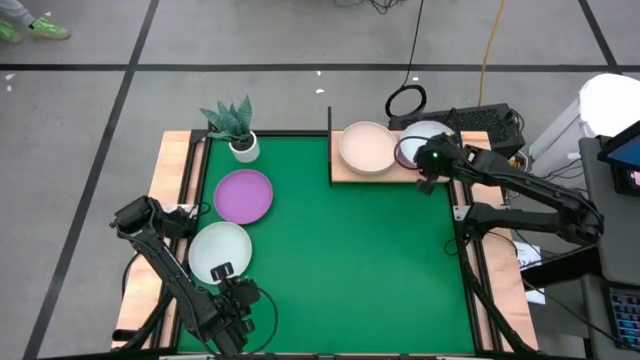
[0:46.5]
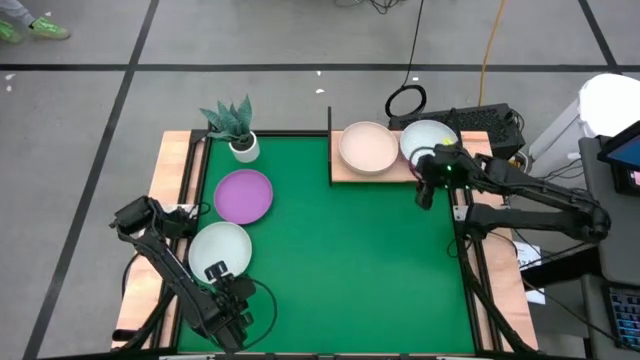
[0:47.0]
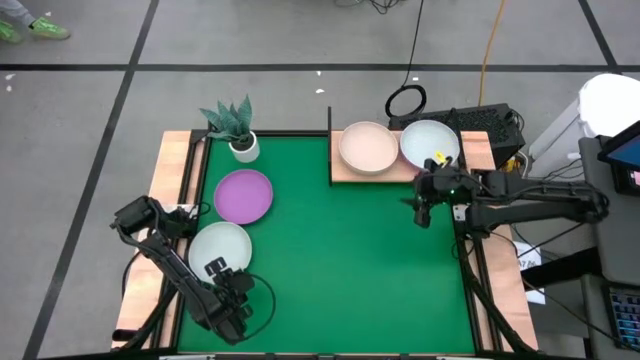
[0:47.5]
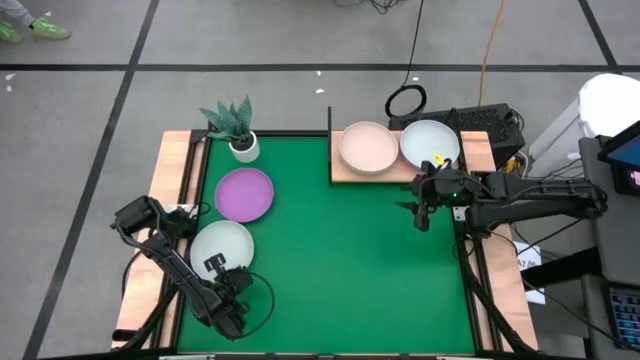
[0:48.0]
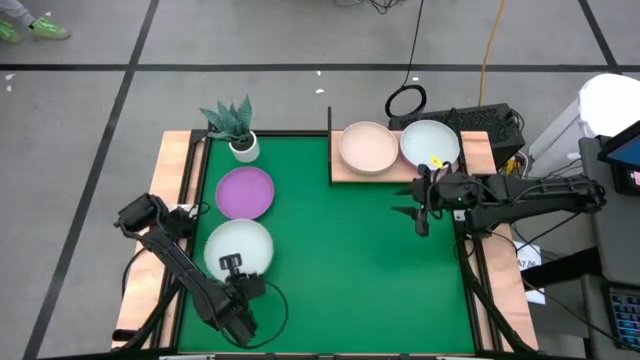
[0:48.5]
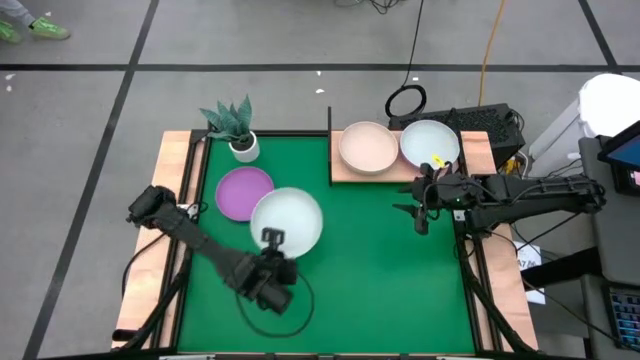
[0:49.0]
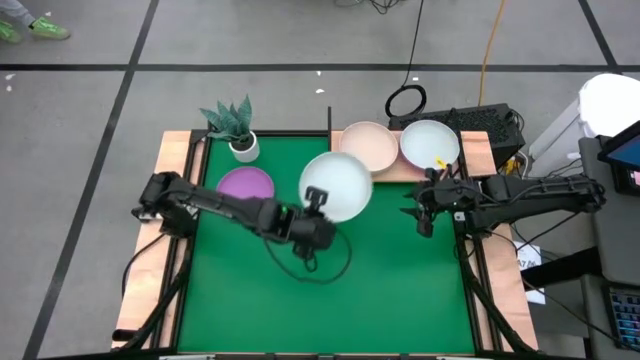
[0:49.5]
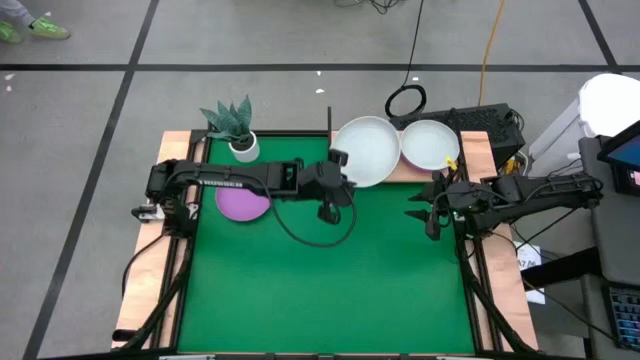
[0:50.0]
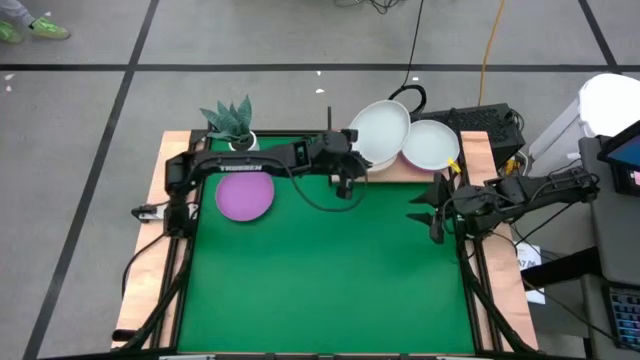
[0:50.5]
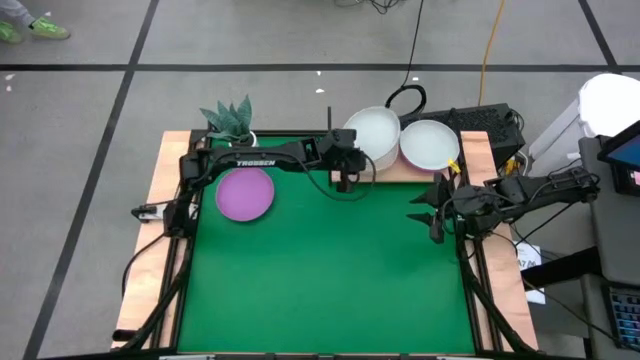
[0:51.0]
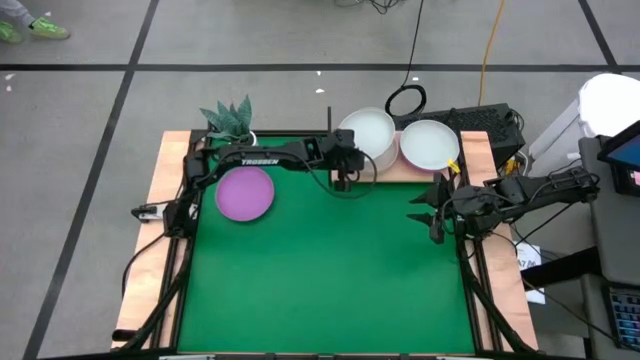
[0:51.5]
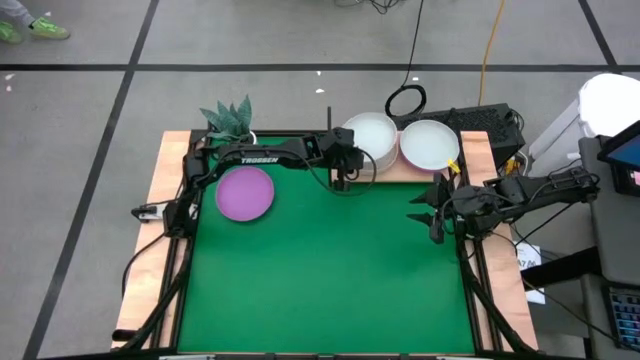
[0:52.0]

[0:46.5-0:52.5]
Task: Place and stack plates onto a shelf
Stack the light blue plate on the light orange plate on the shelf

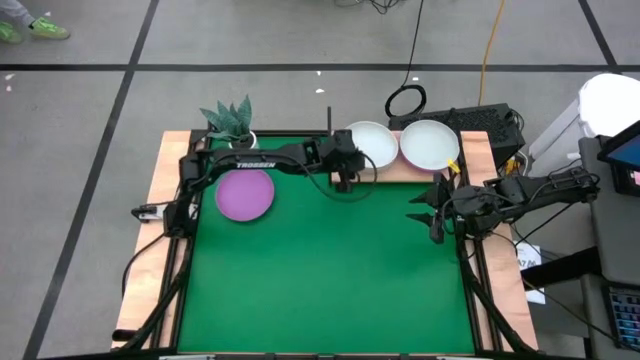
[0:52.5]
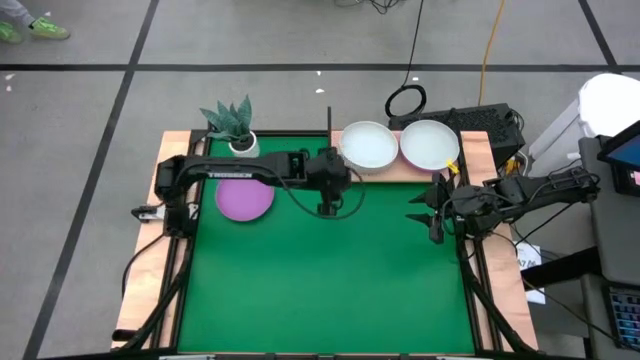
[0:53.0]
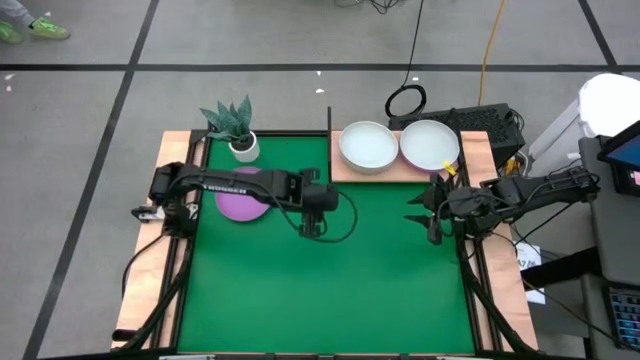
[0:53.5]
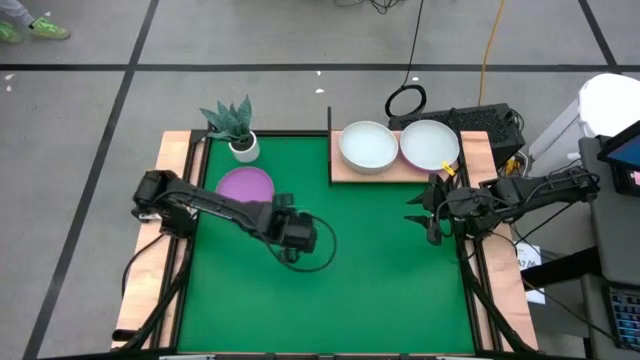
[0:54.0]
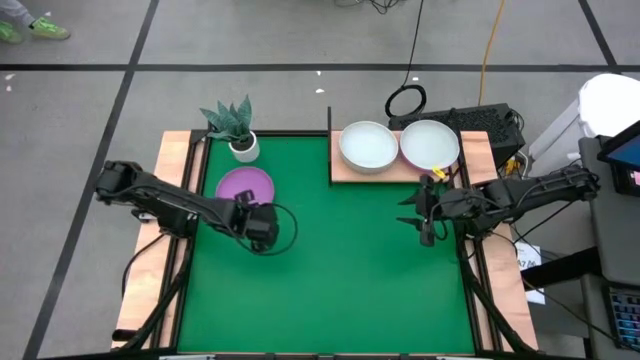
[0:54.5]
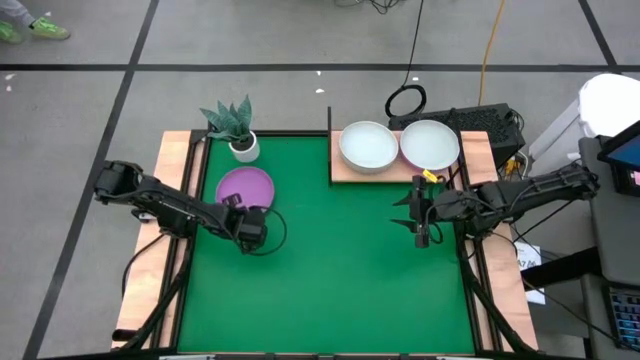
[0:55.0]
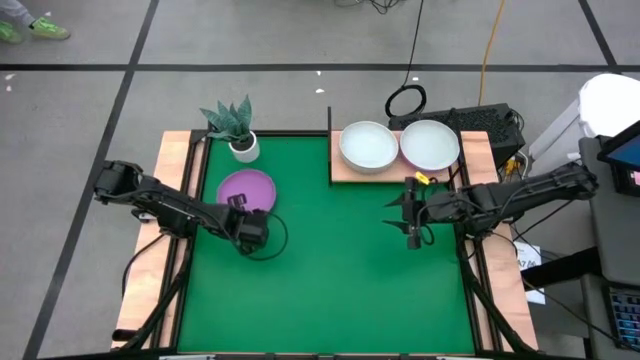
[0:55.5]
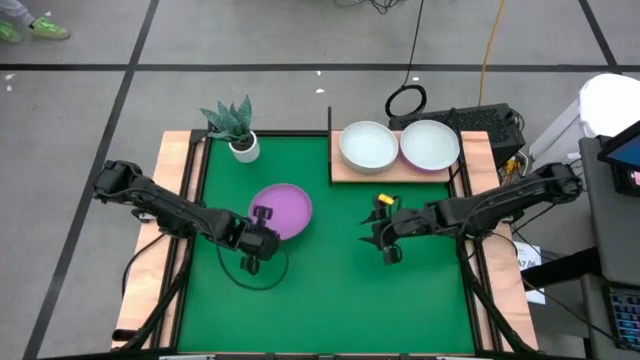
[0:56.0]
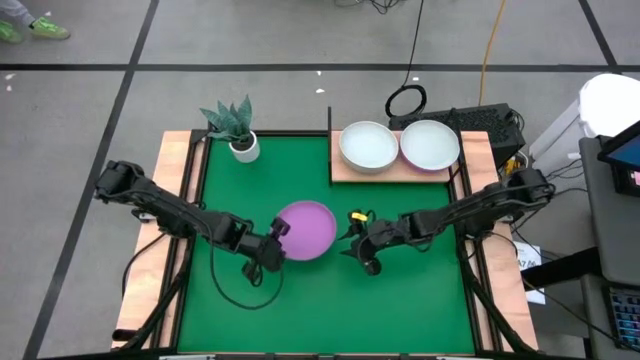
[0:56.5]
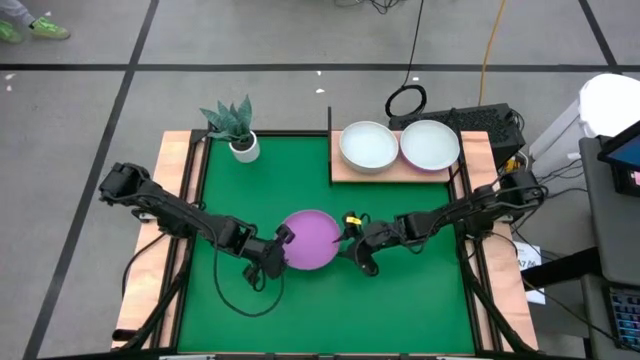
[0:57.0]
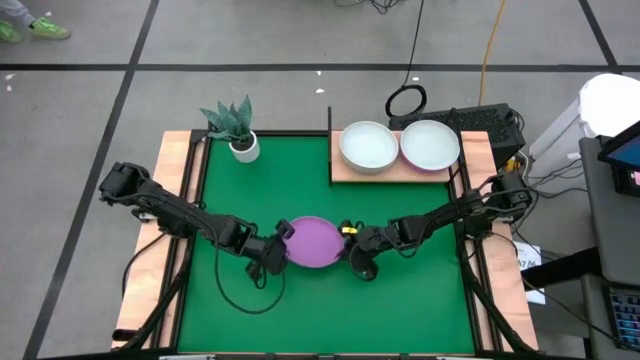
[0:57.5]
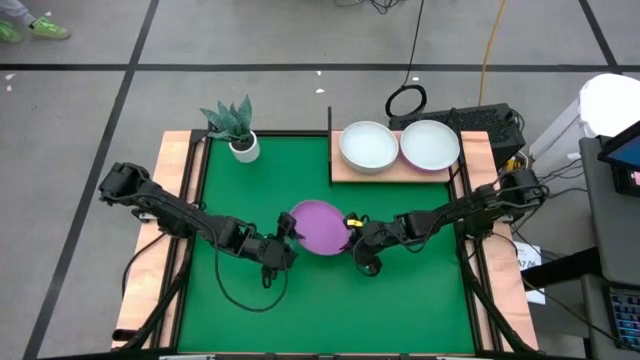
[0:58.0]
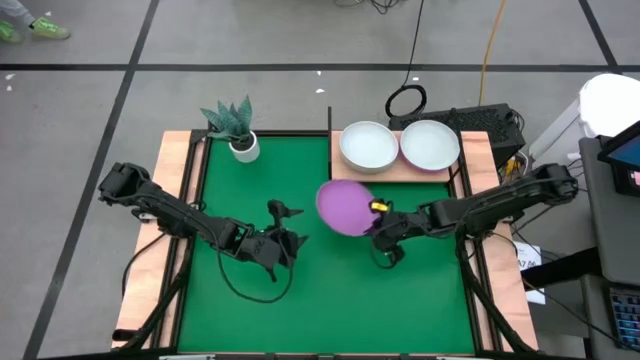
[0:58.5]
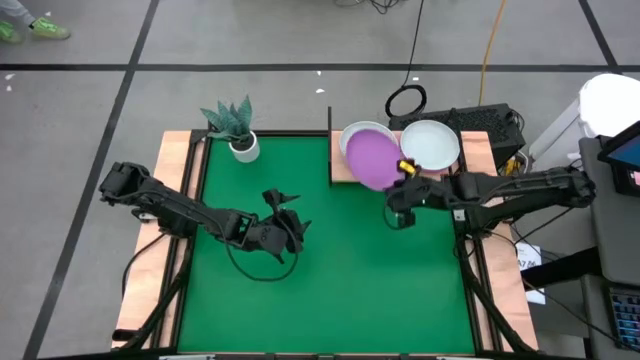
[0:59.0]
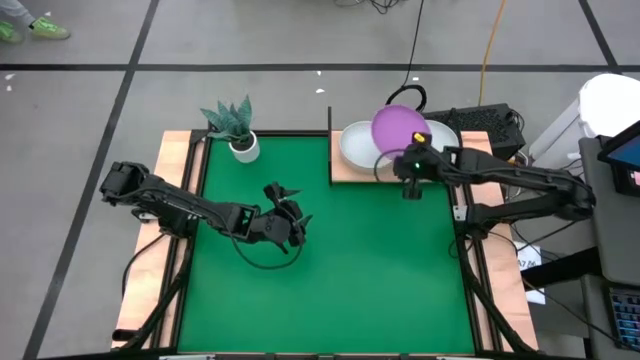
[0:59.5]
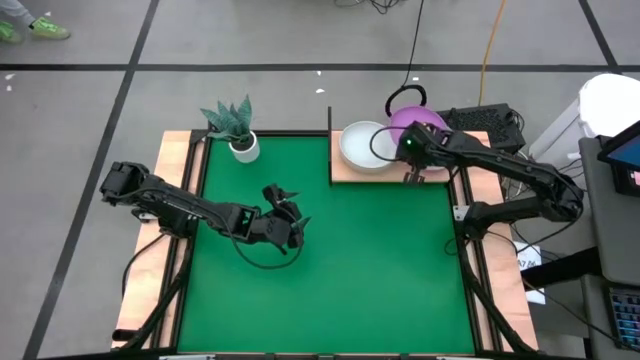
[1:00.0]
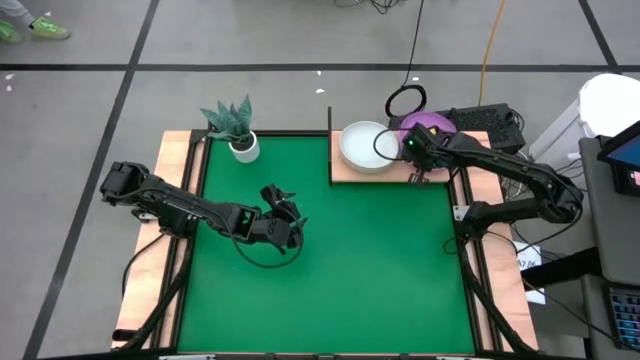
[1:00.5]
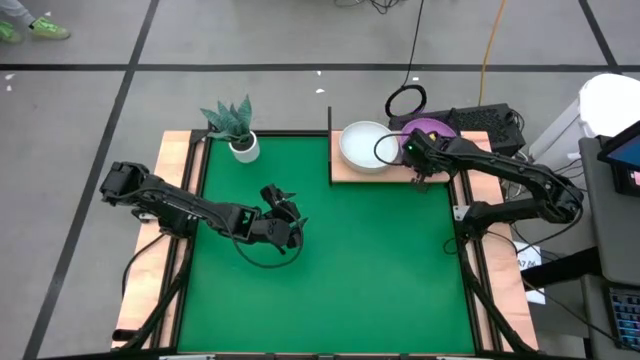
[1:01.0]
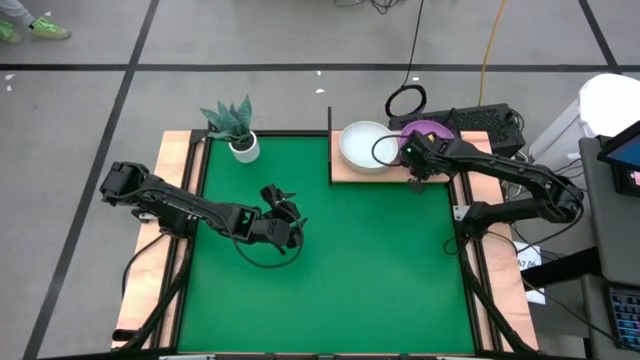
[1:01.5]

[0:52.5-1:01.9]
Stack the purple plate on the right light blue plate on the shelf

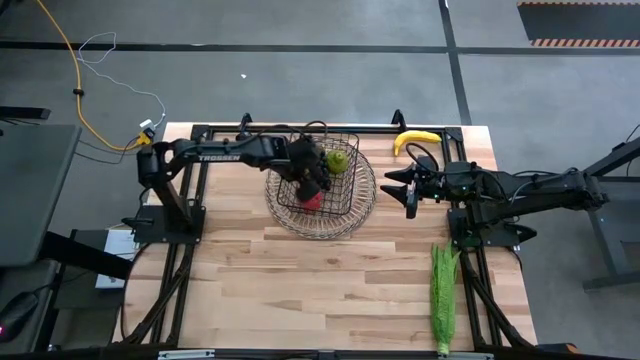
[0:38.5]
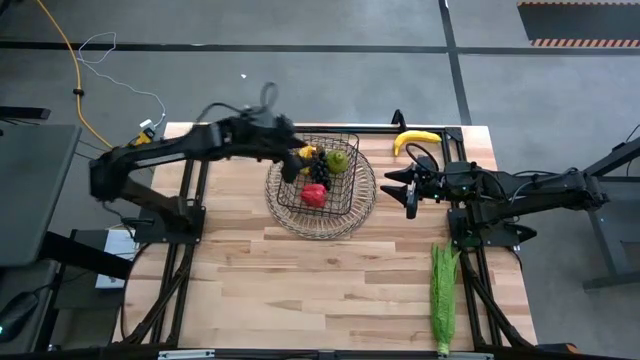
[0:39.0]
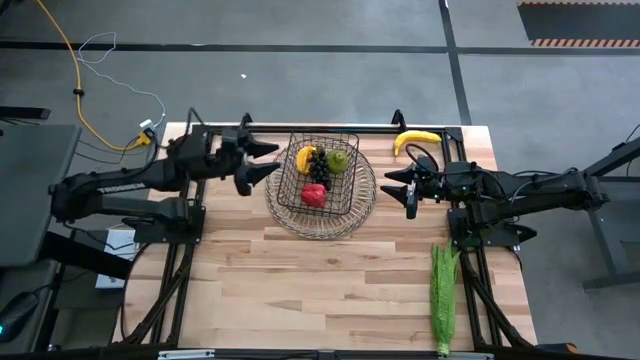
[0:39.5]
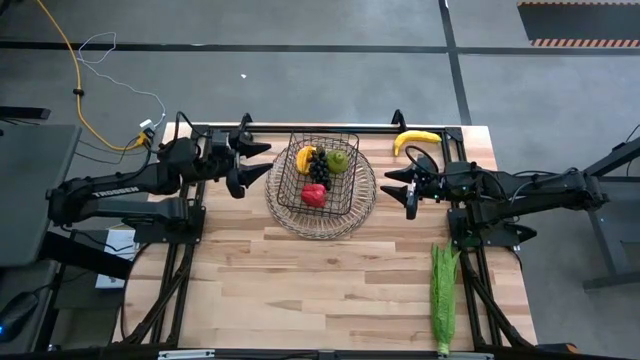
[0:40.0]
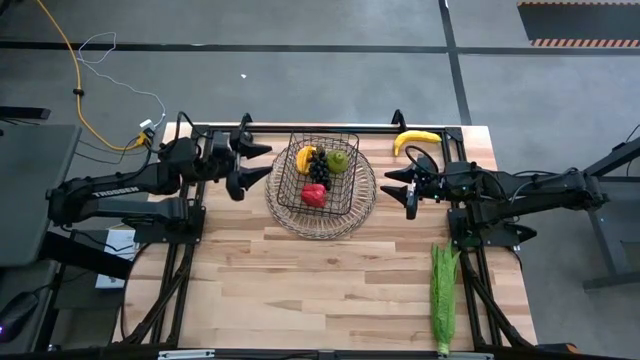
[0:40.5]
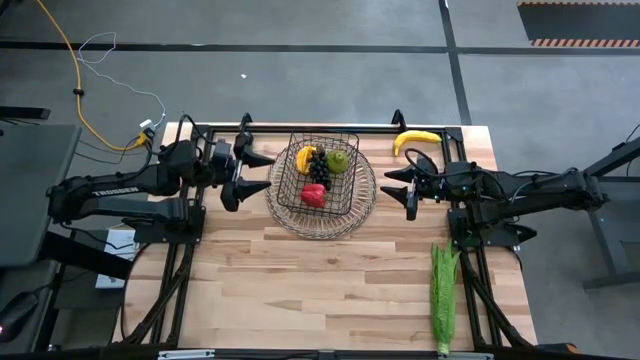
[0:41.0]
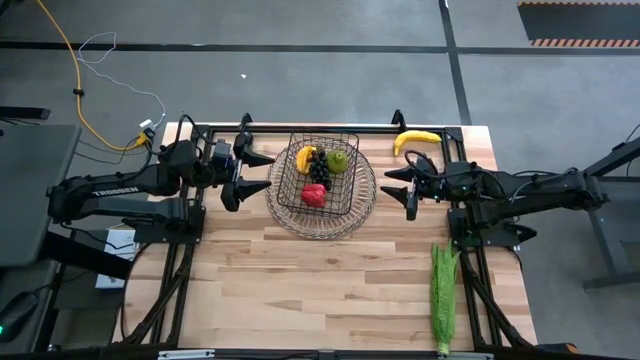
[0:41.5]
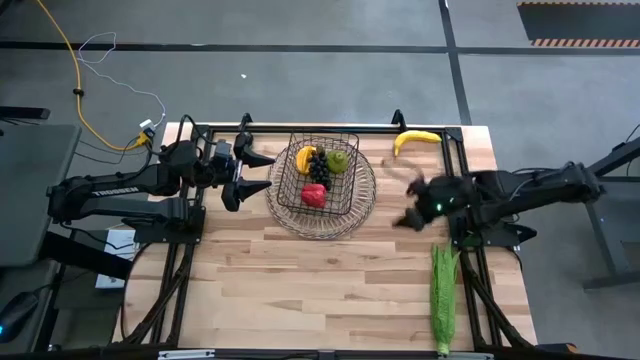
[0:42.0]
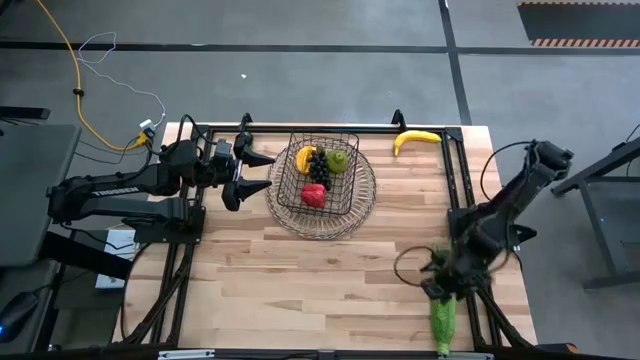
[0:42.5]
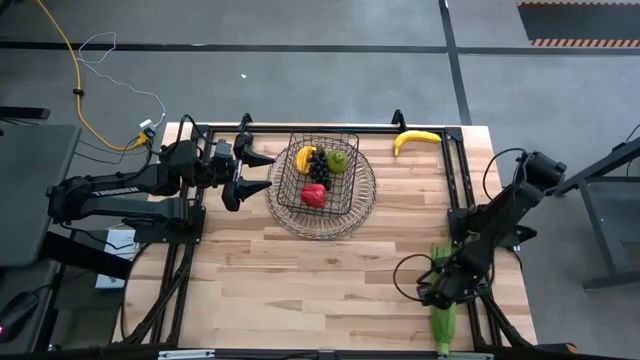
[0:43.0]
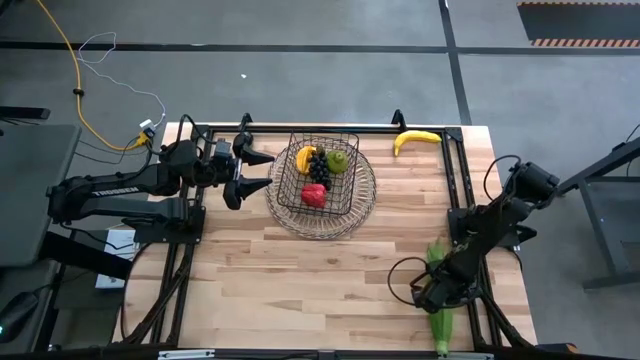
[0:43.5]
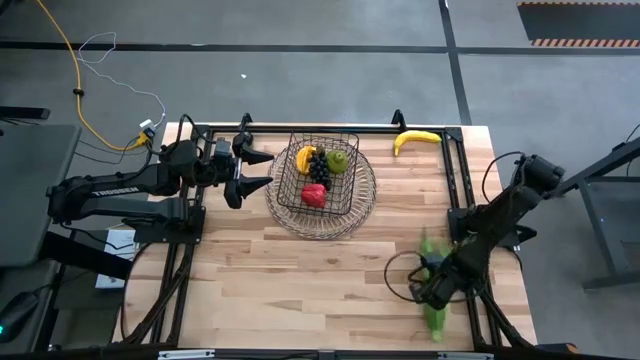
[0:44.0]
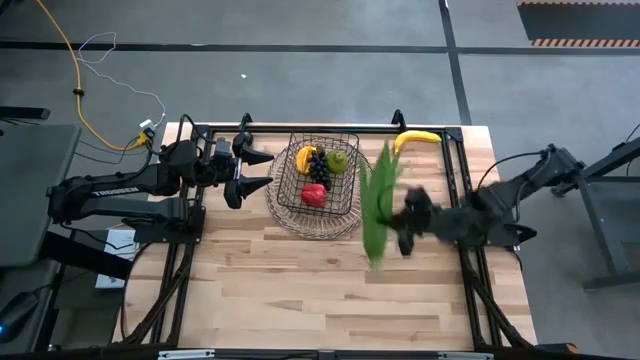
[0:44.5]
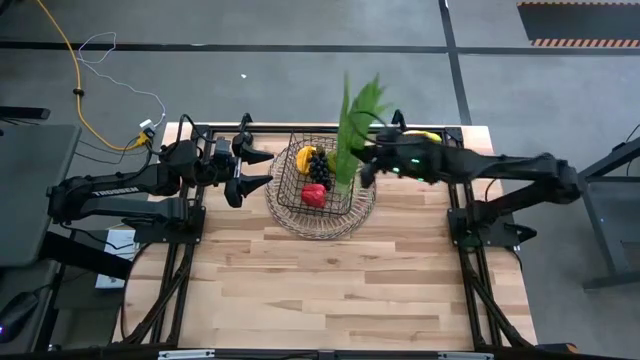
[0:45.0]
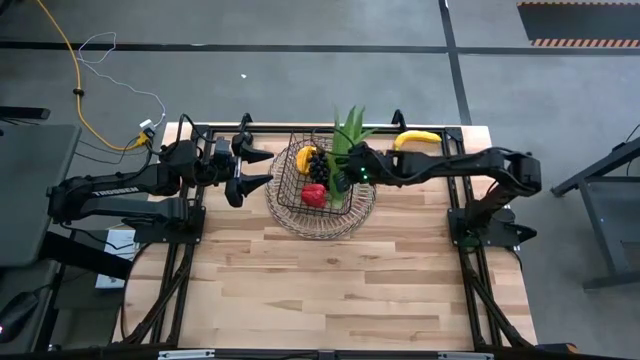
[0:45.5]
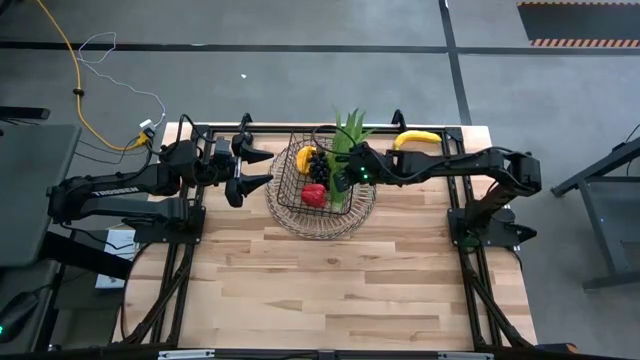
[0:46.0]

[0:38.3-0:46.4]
Task: Build produce basket
Put the leaf lettuce into the wire basket
